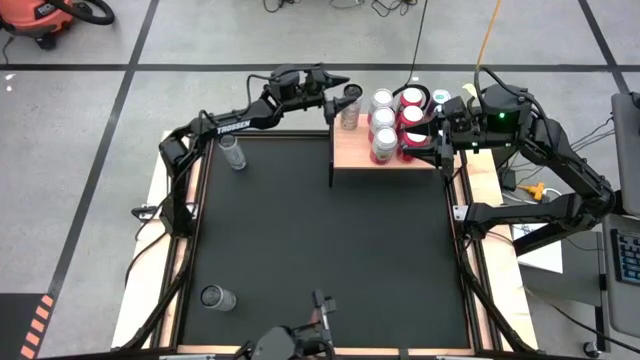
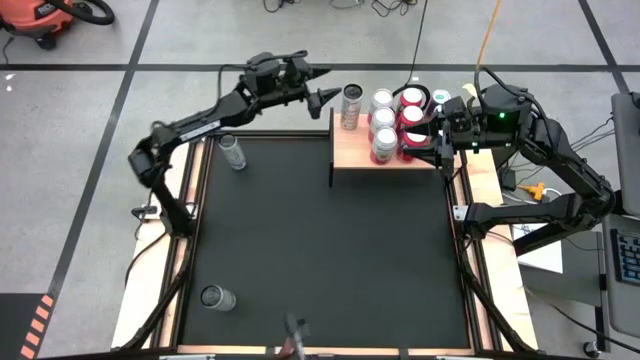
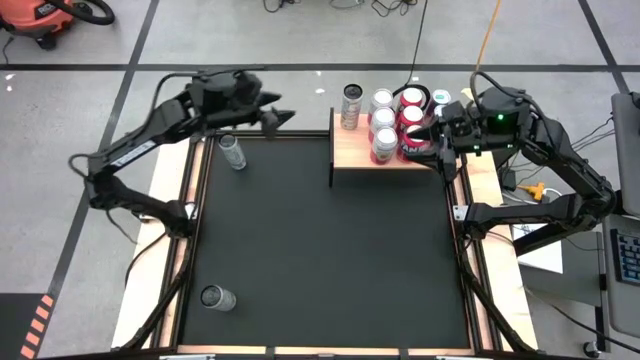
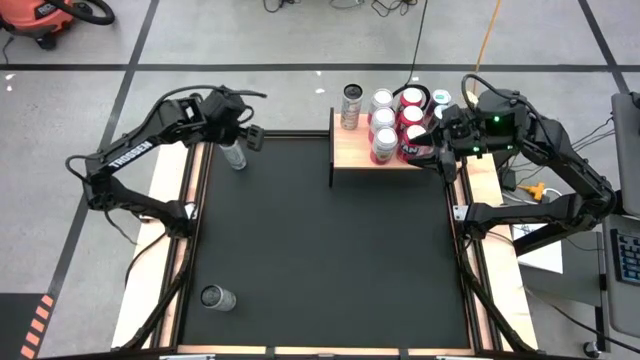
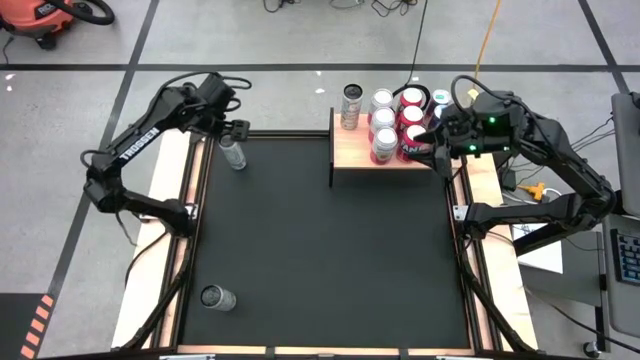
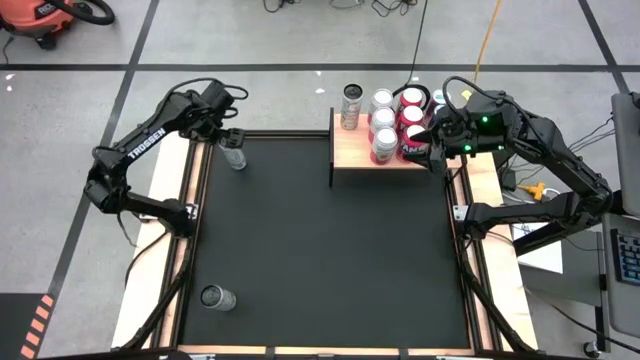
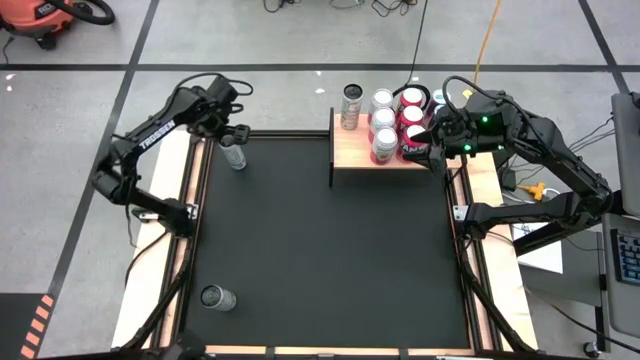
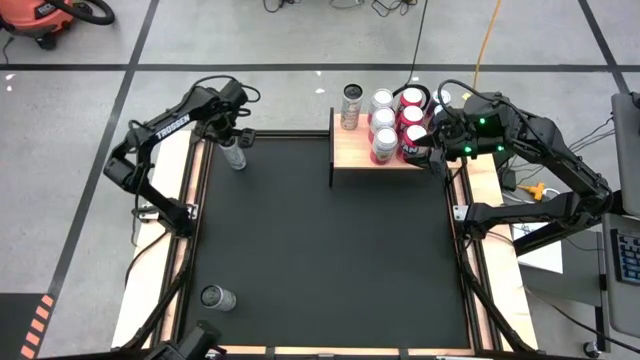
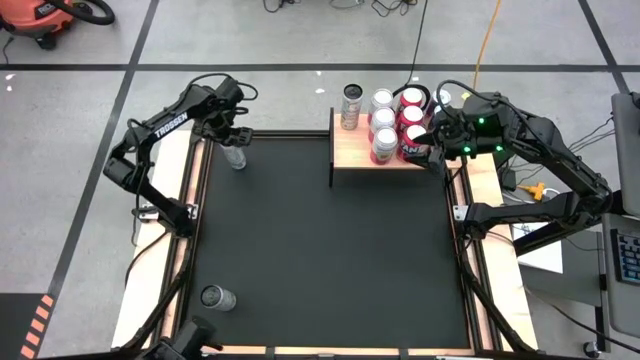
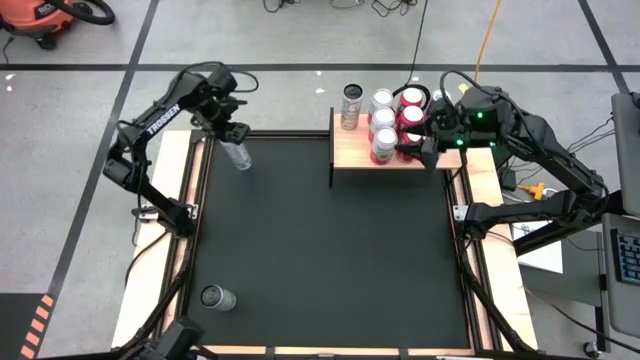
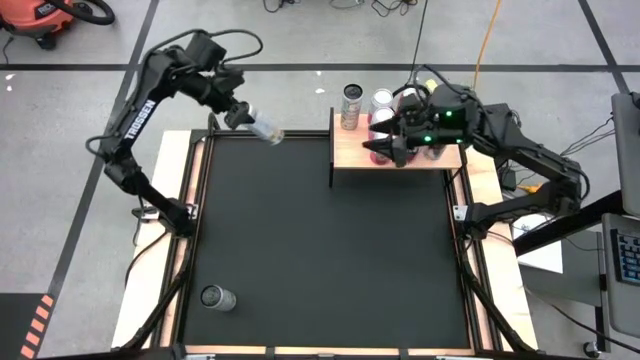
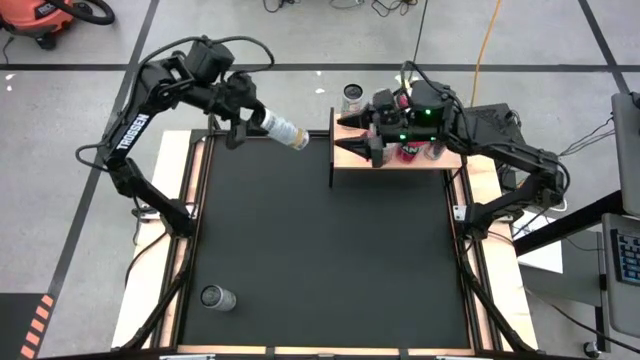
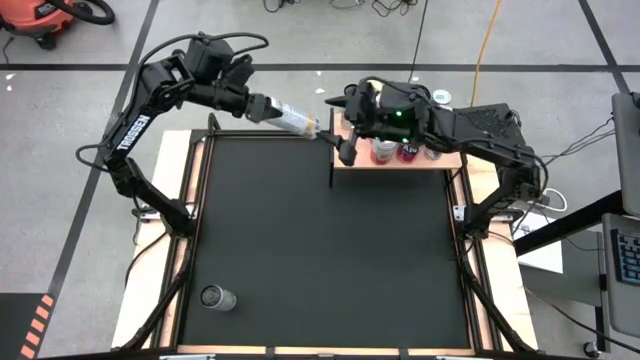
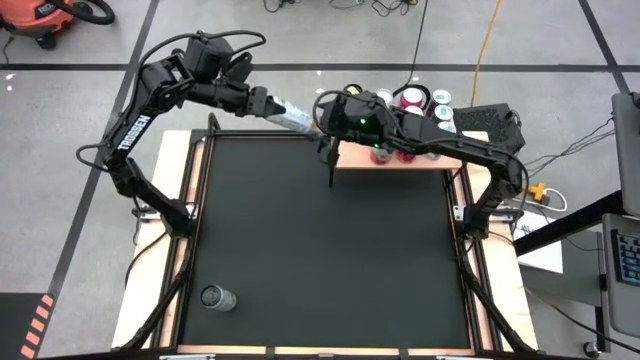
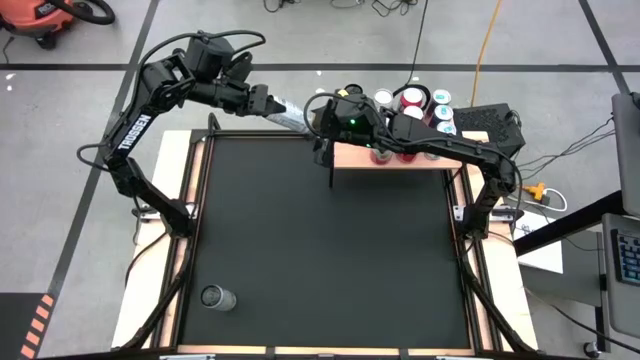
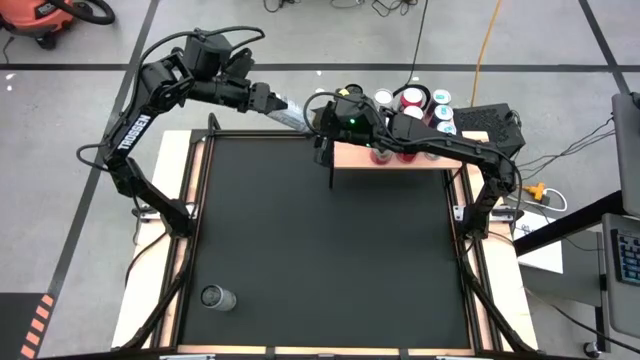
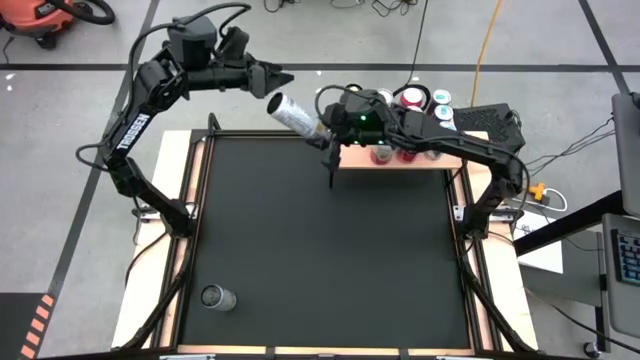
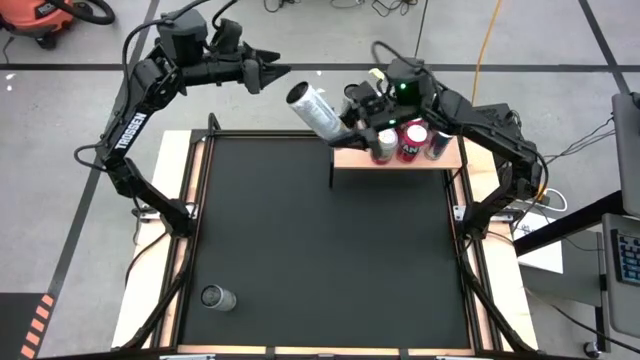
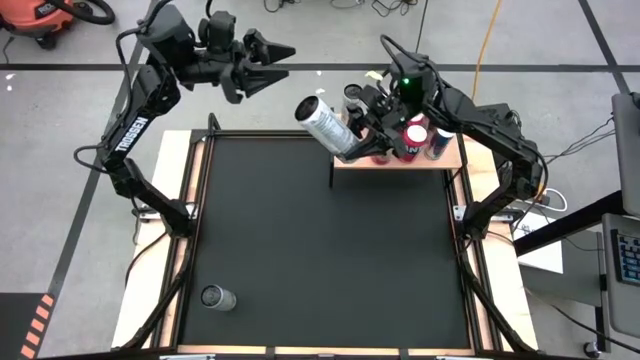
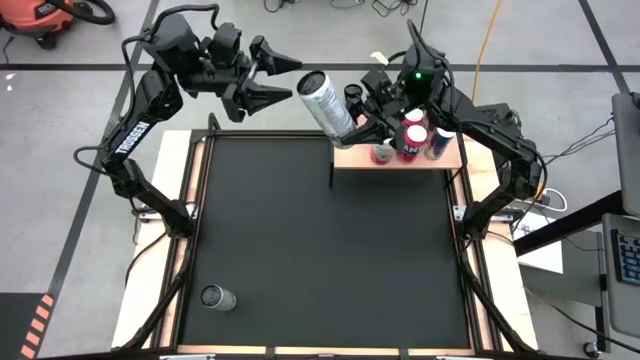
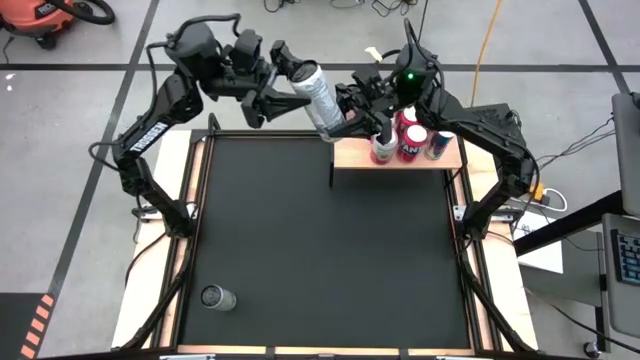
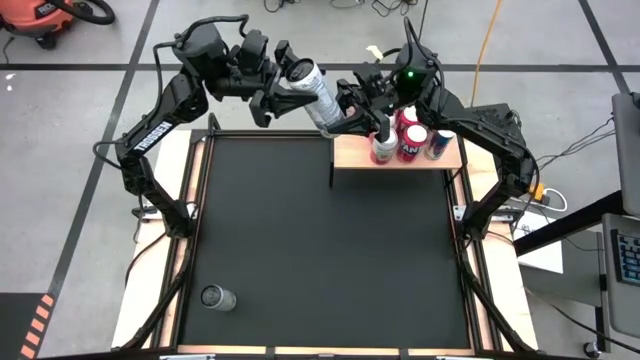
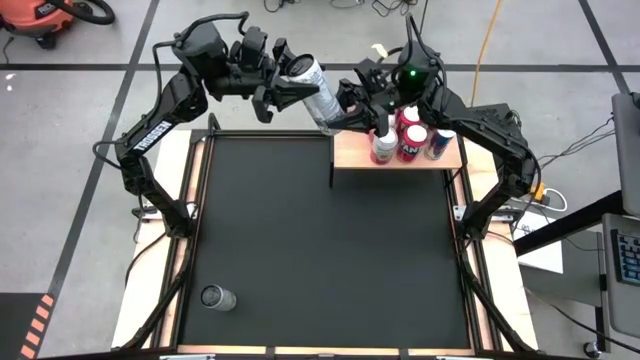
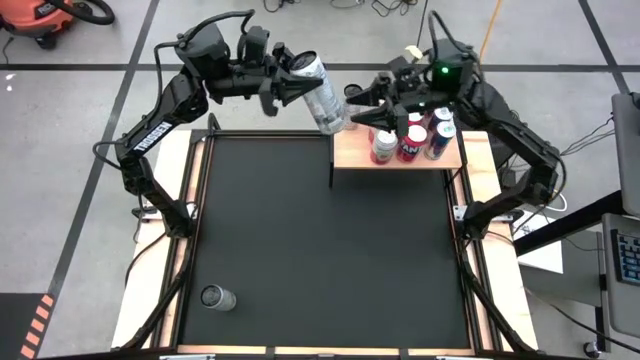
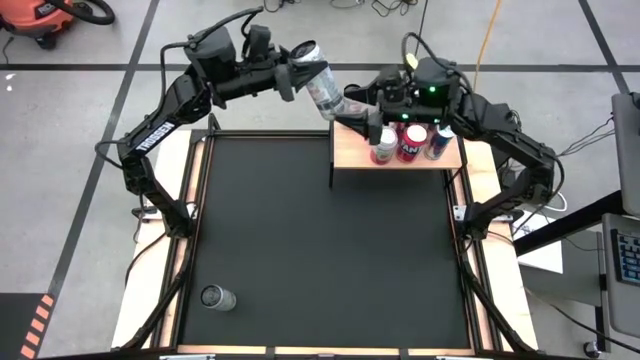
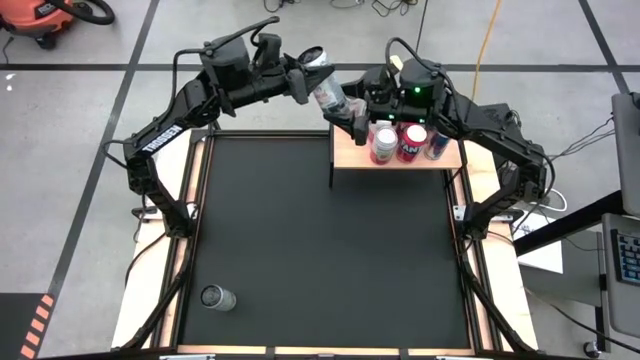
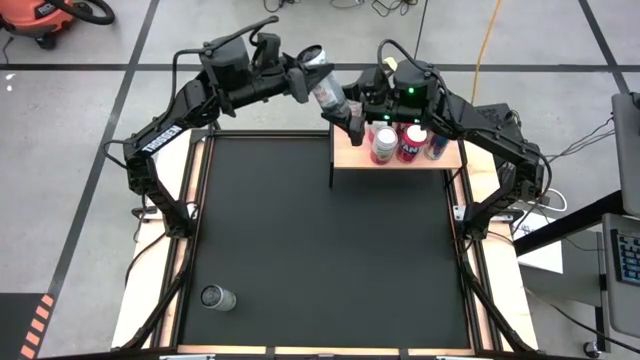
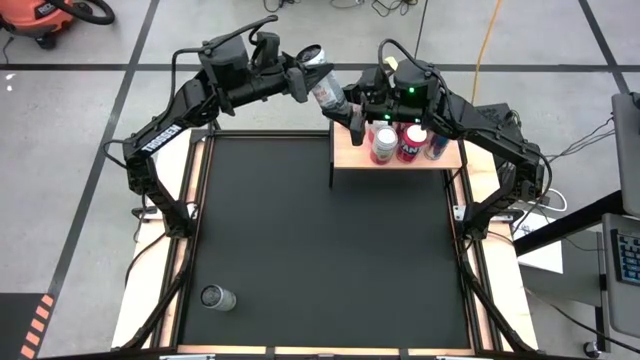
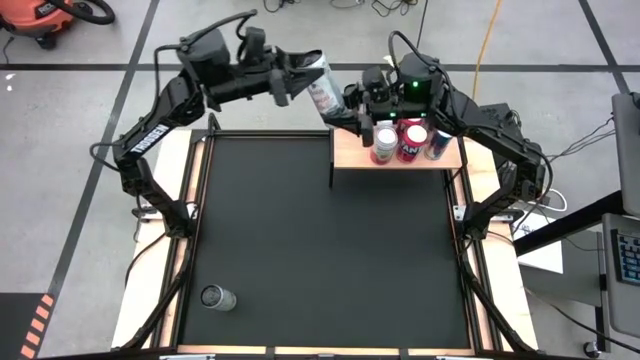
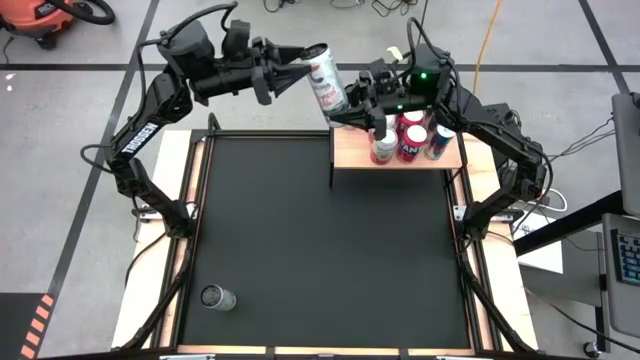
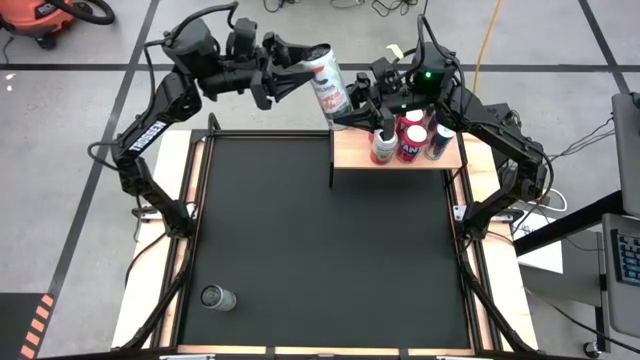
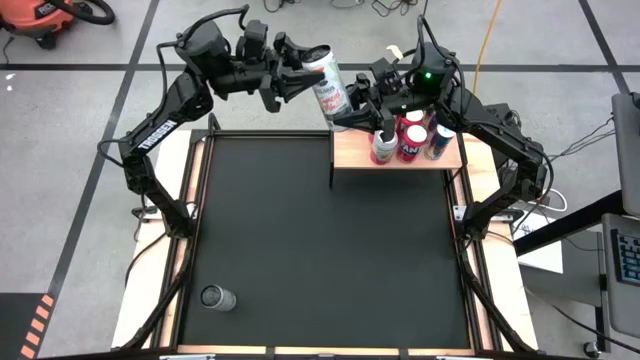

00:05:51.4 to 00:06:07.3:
Task: Place canned beverage on shelf
Put the top white yellow soda can on the shelf aligned with the other white yellow soda can

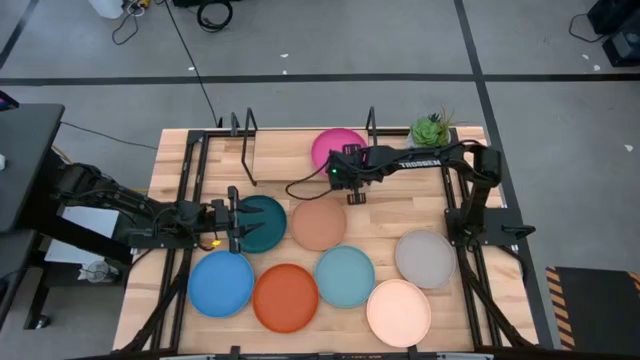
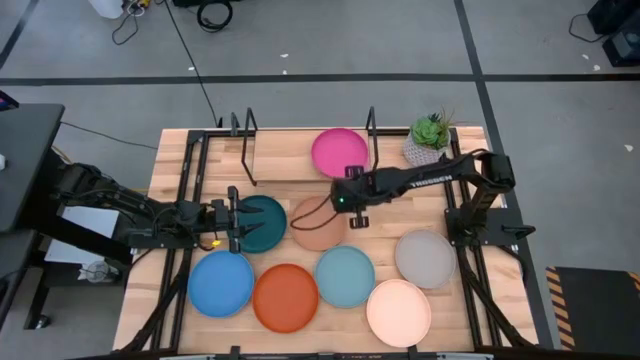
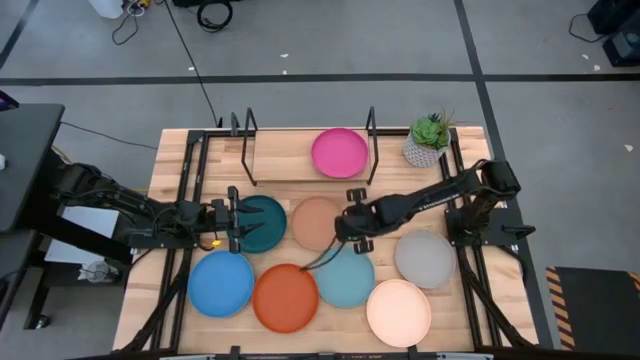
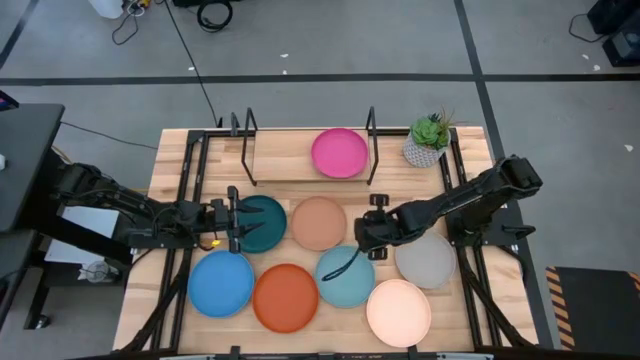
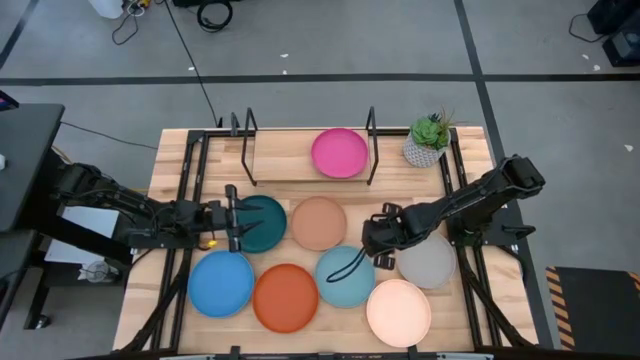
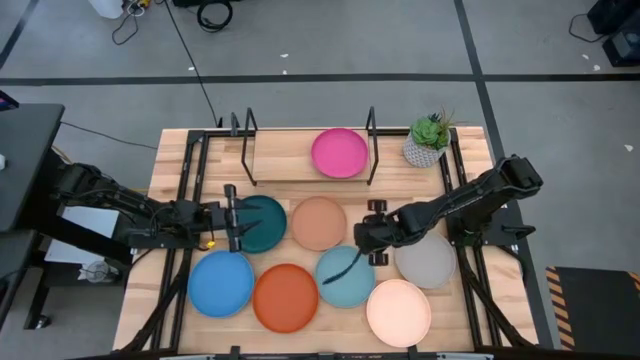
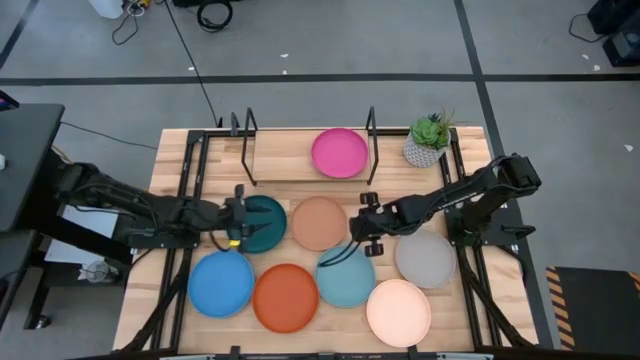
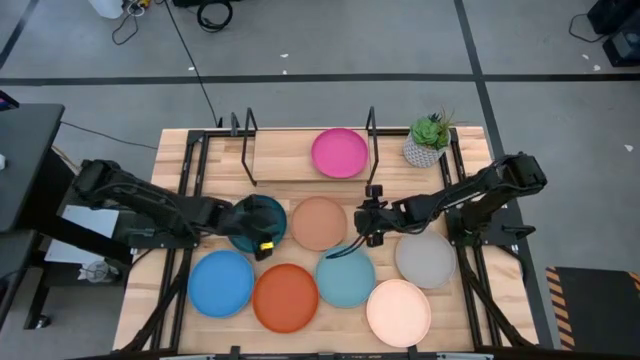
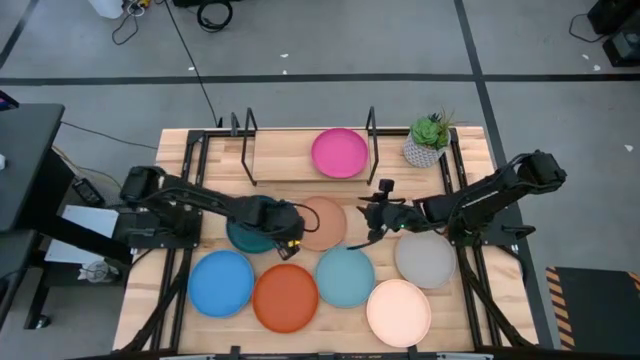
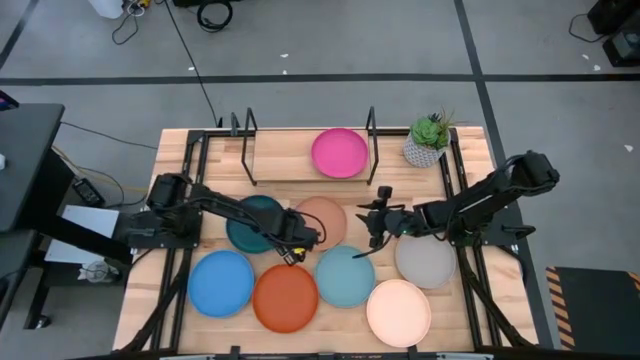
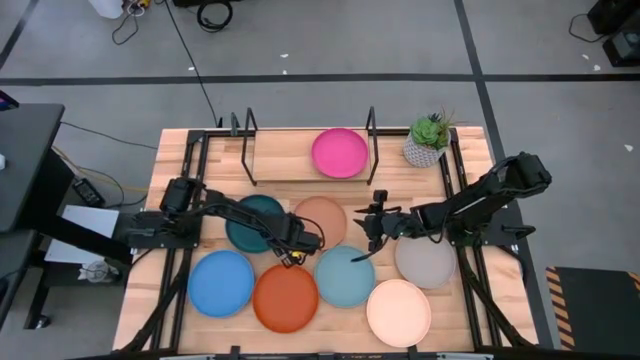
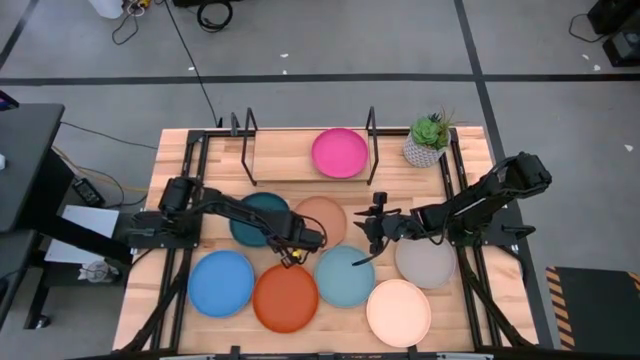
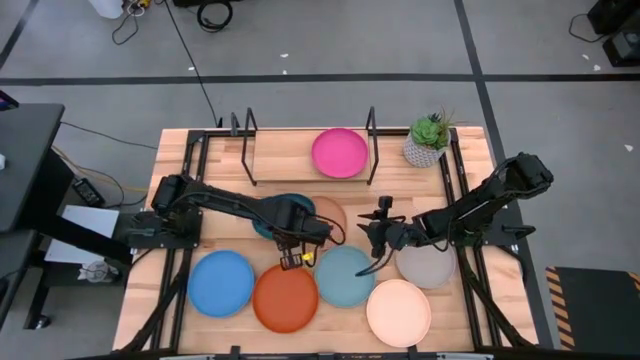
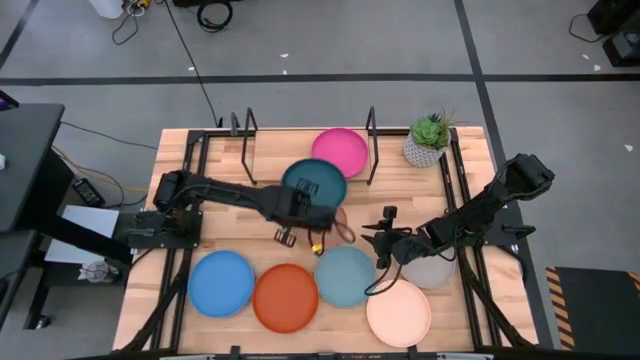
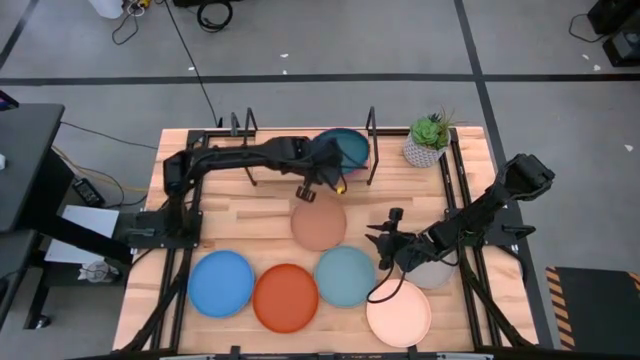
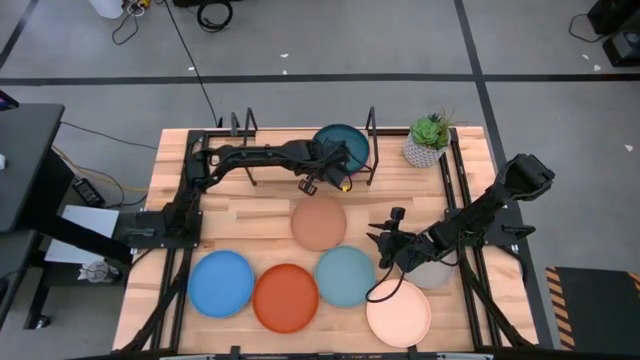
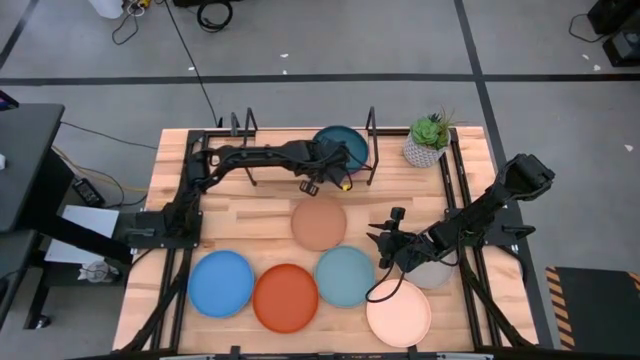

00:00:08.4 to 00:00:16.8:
Task: Place and stack plates onto a shelf
Stack the dark green plate on top of the pink plate on the shelf
